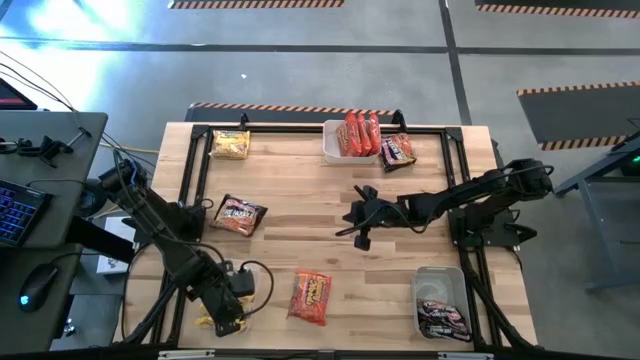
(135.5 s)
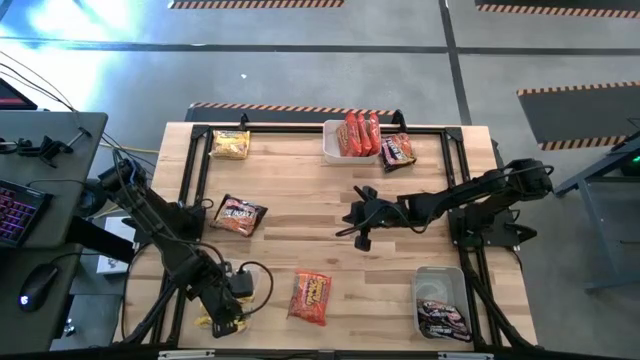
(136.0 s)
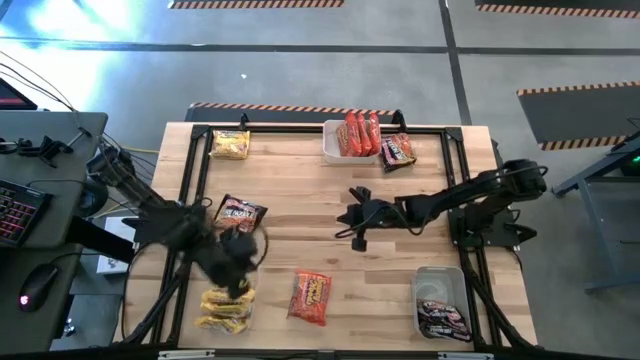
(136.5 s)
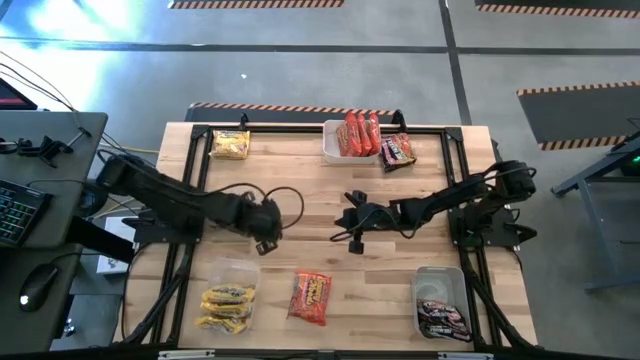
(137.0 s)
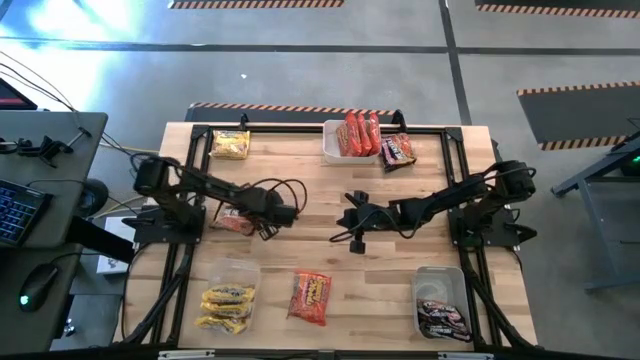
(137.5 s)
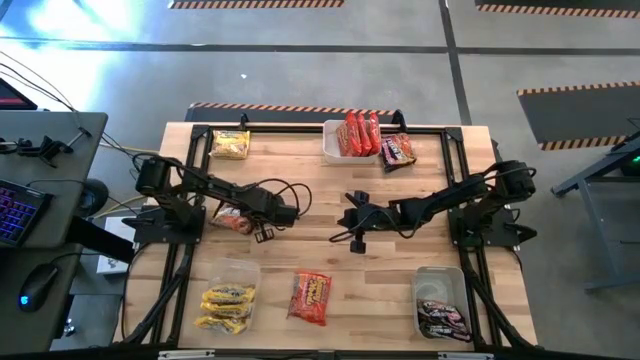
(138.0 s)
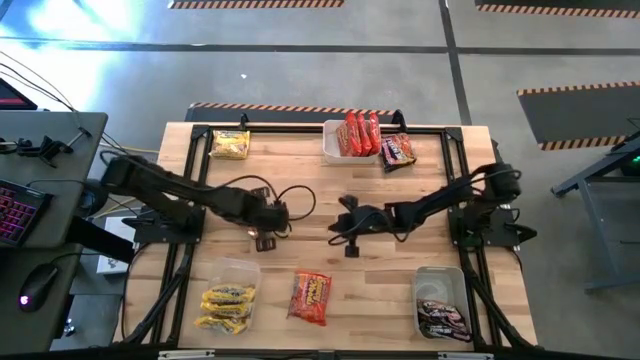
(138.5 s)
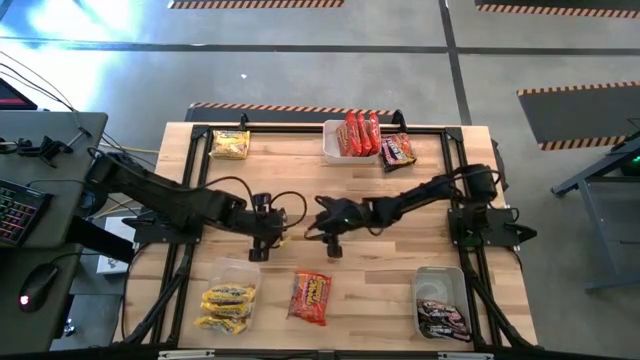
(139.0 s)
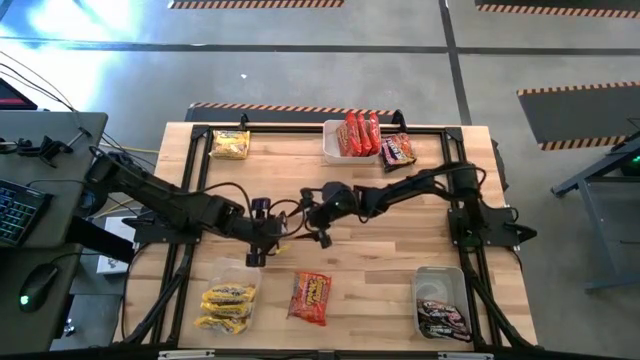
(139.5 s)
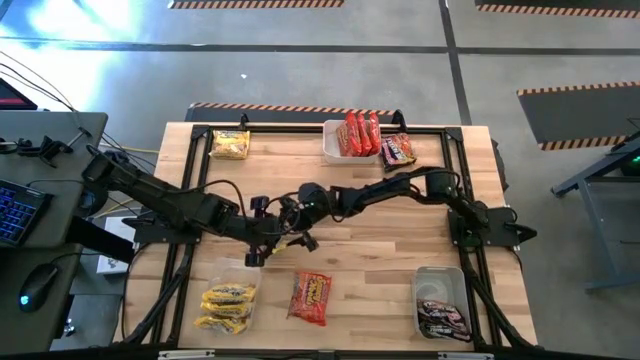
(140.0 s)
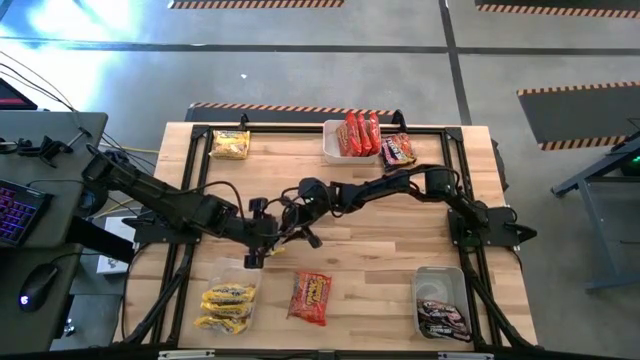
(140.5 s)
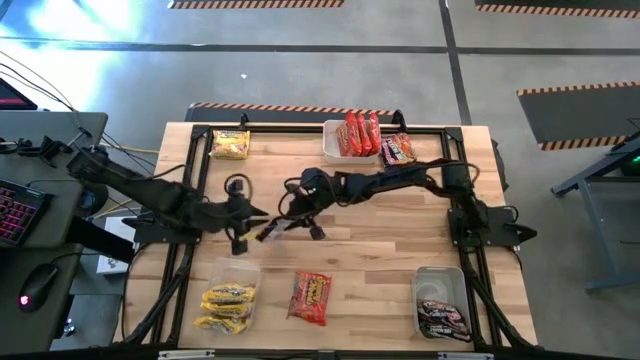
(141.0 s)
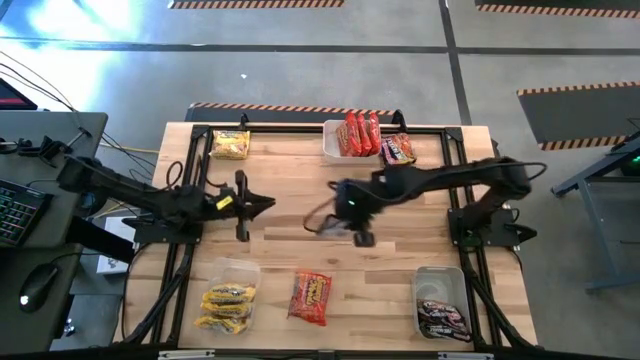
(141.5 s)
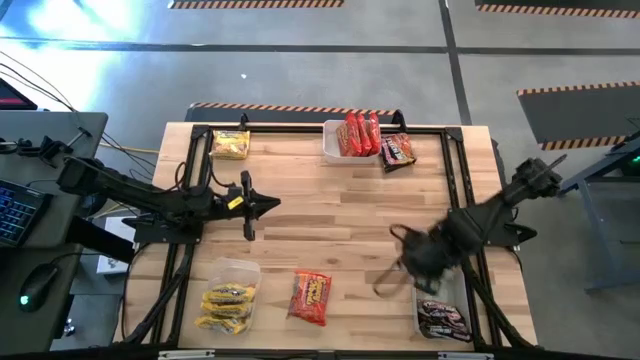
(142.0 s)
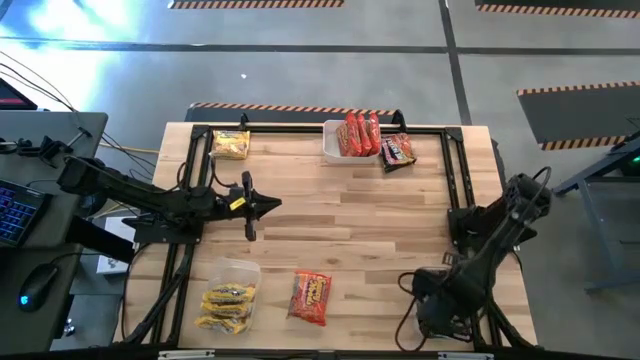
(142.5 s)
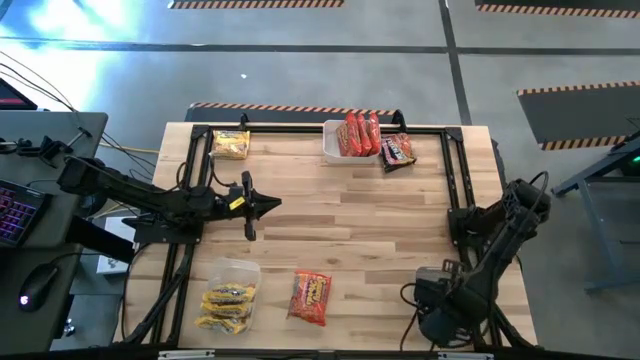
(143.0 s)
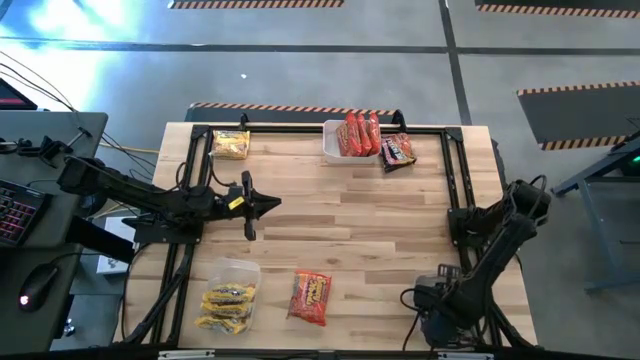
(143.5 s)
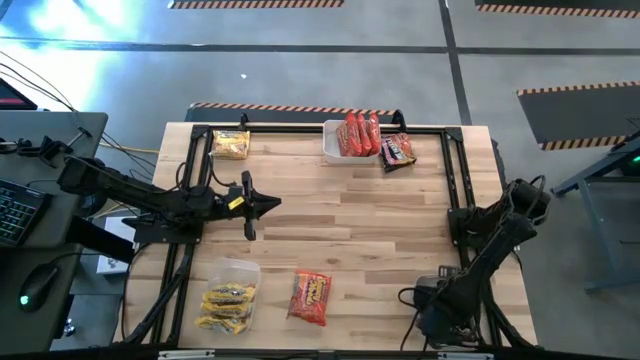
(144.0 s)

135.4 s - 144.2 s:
Task: Sort Maruchan noodles
Put the black noodle pack into the gray bin

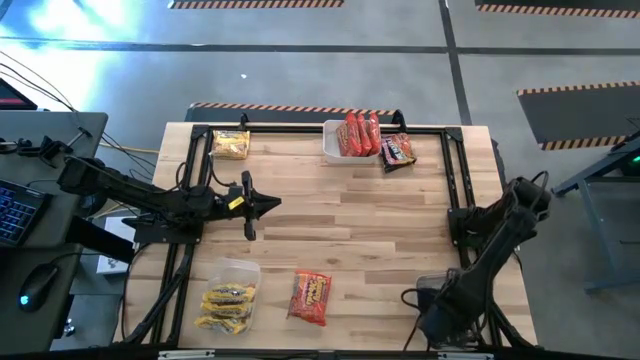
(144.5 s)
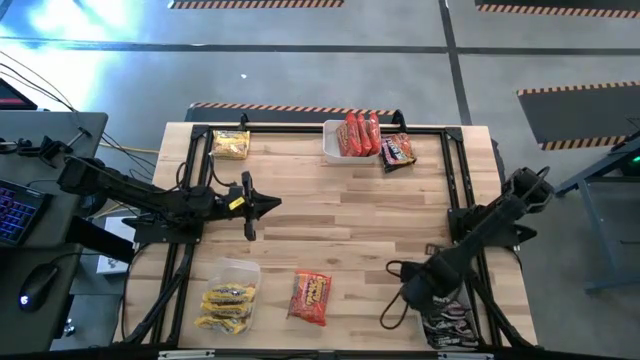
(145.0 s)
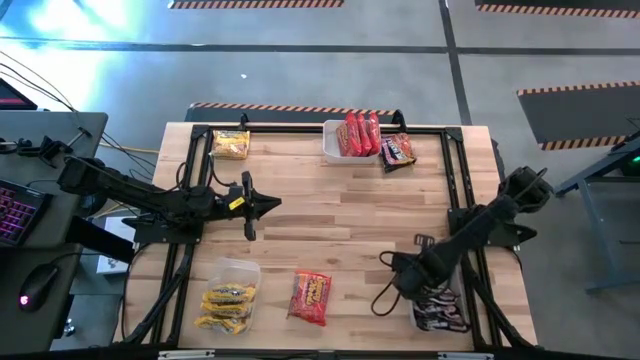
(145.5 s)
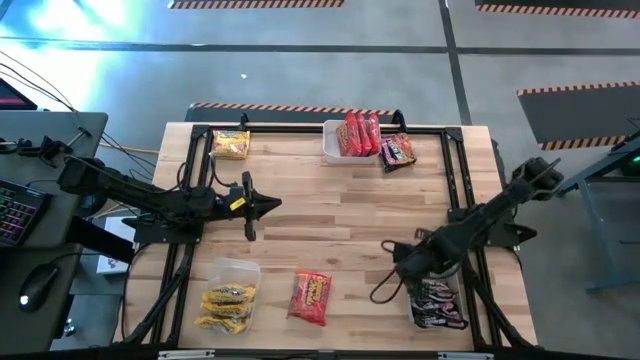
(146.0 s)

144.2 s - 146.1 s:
Adjust the gray bin on the table

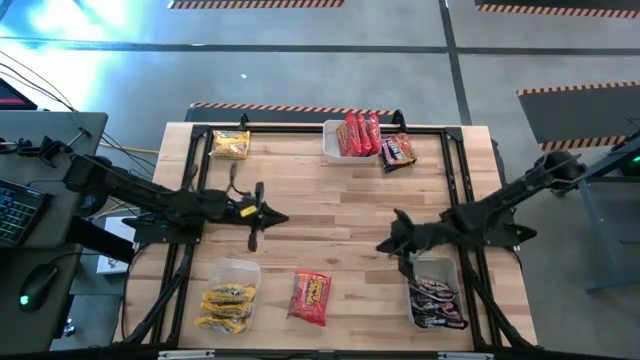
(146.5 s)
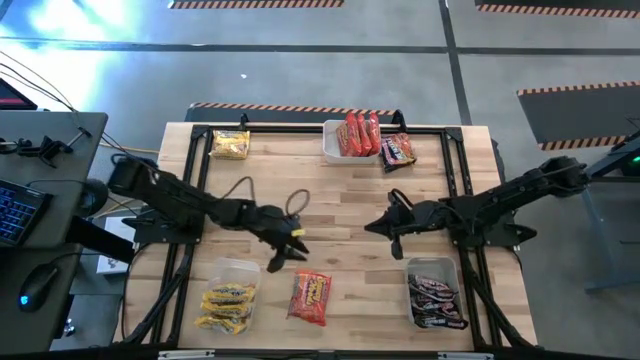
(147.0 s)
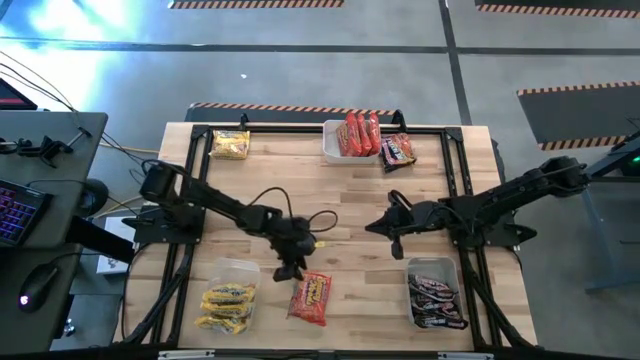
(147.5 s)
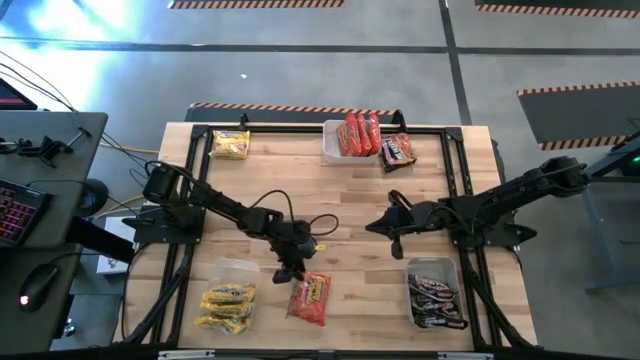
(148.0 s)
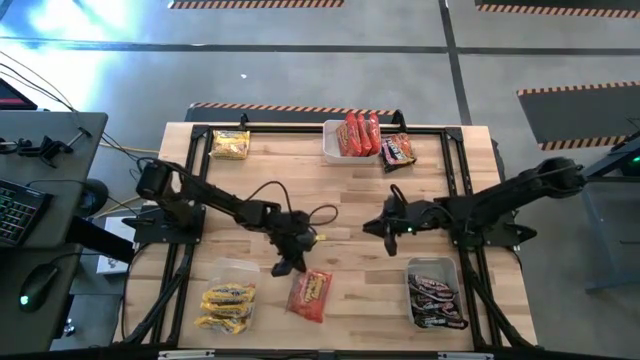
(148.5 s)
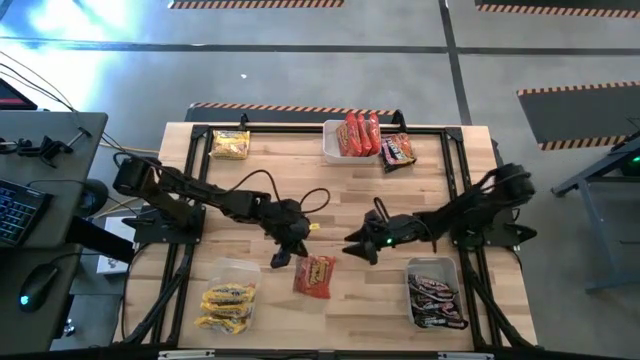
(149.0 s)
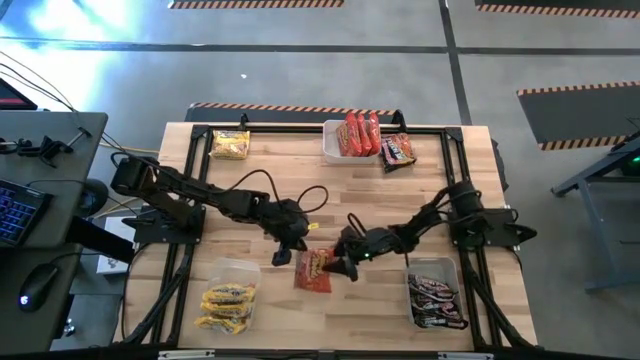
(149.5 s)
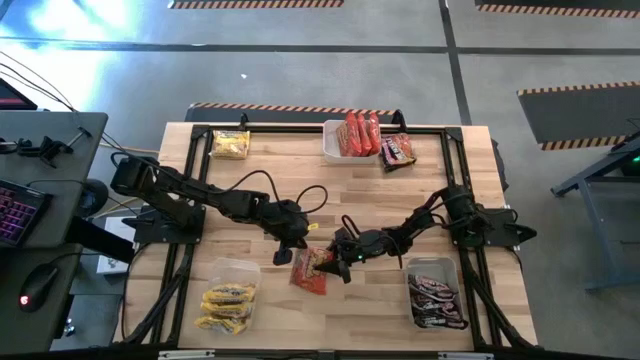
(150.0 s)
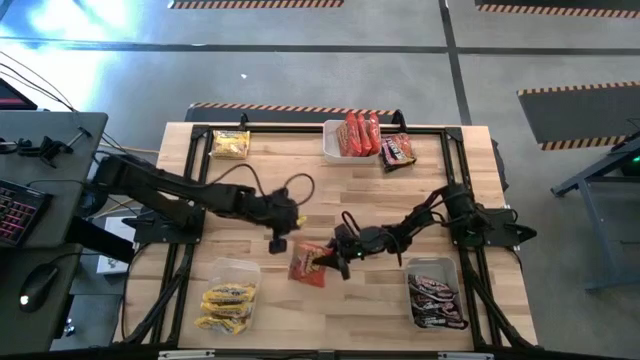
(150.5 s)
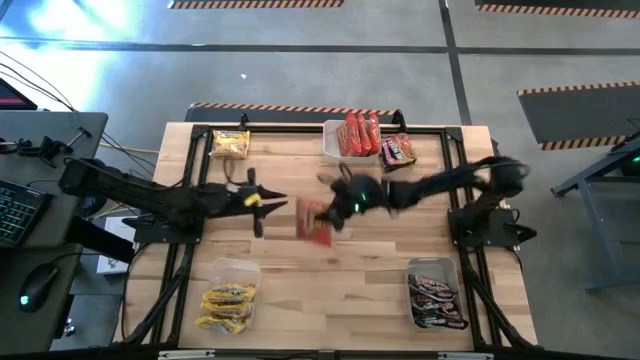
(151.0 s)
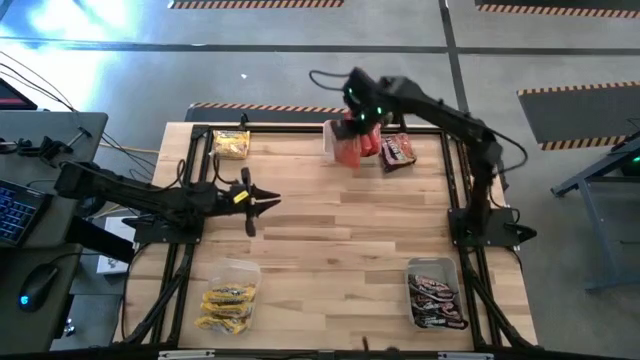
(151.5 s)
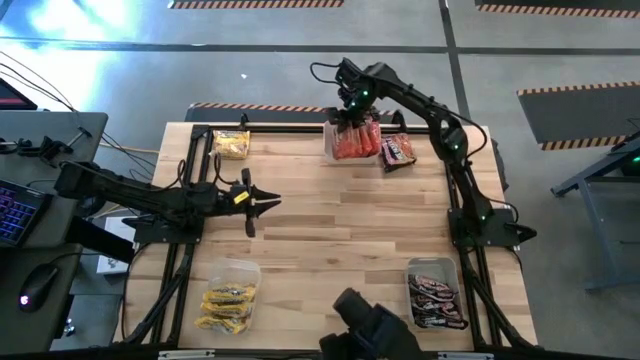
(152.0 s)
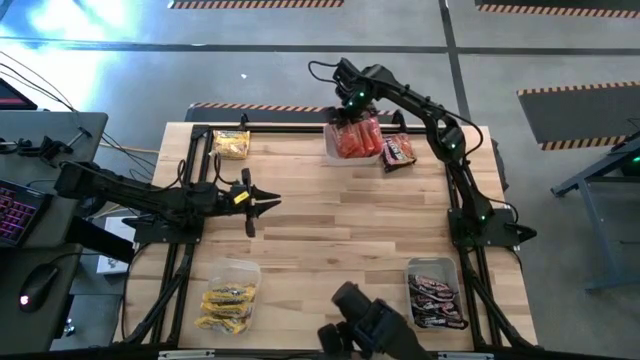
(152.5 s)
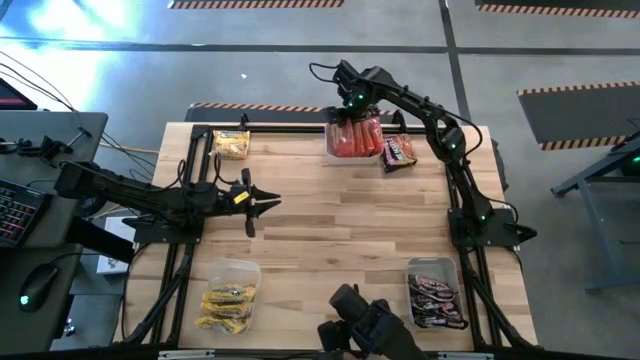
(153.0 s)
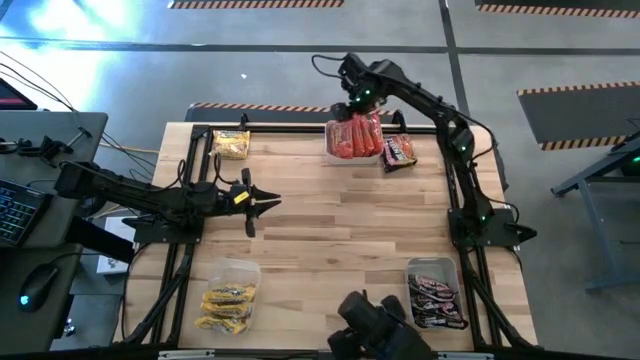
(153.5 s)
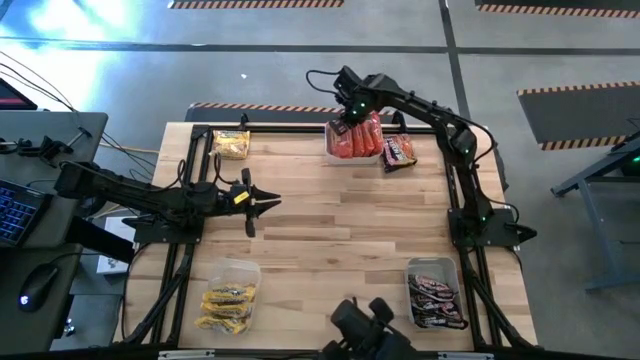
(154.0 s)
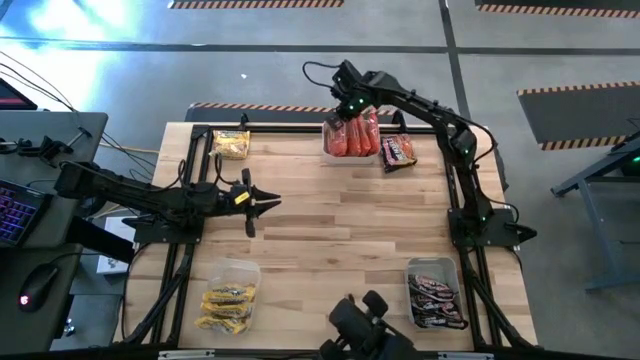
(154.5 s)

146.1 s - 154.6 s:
Put the orange noodle pack into the white bin

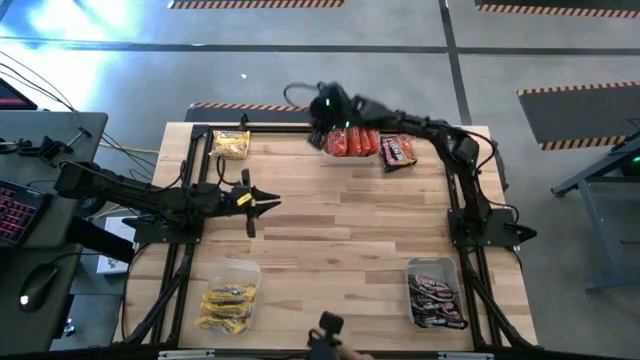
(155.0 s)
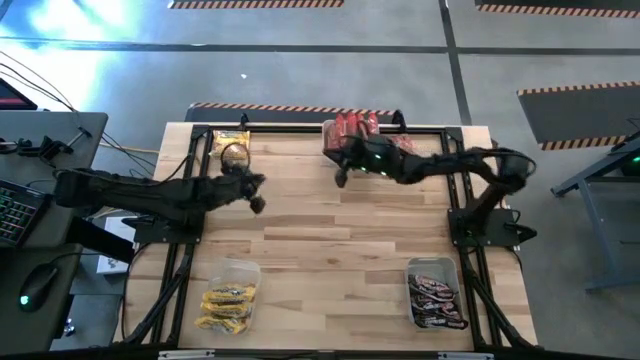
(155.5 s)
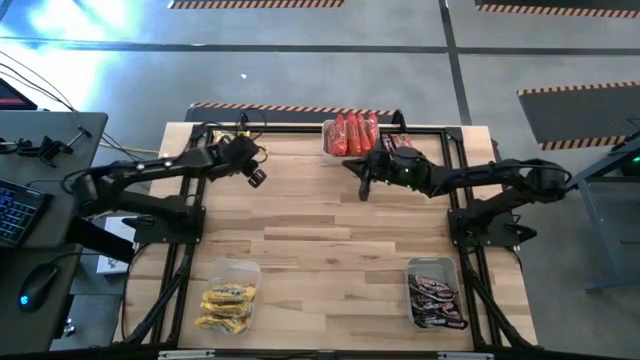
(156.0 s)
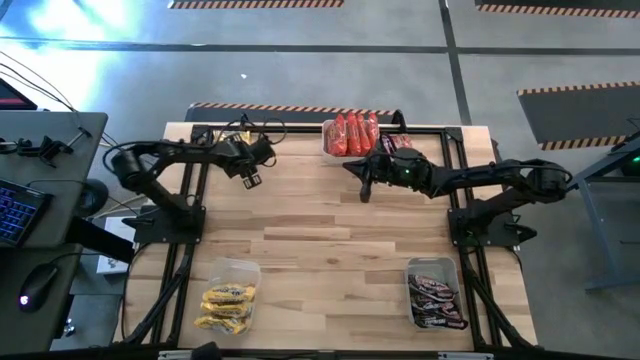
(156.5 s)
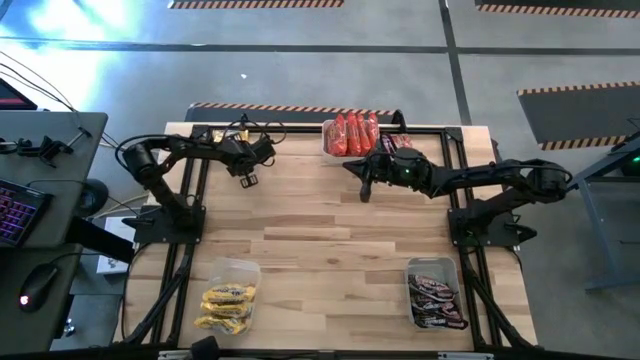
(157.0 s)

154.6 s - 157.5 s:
Put the yellow noodle pack into the transparent bin
